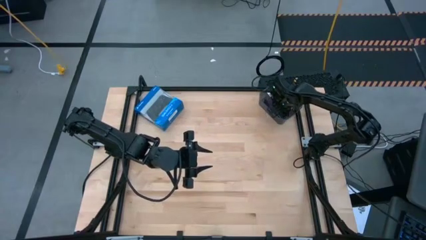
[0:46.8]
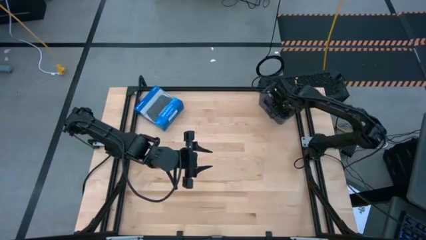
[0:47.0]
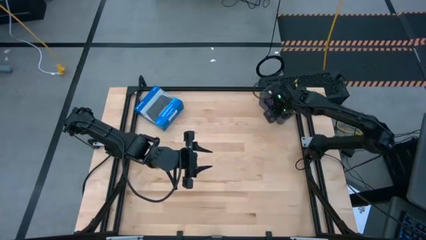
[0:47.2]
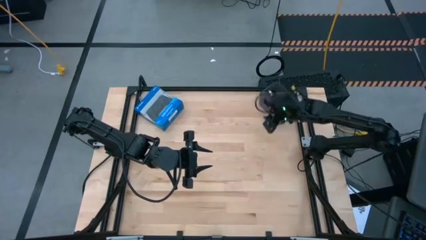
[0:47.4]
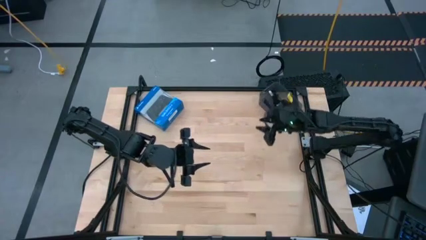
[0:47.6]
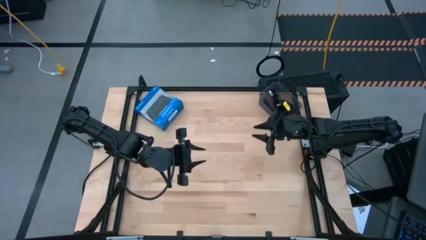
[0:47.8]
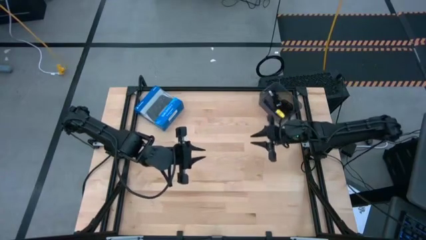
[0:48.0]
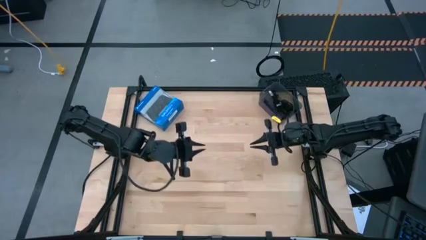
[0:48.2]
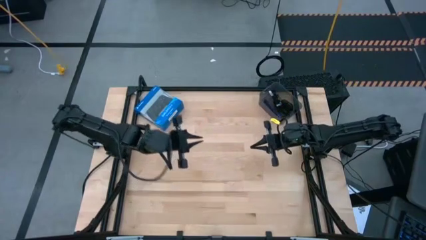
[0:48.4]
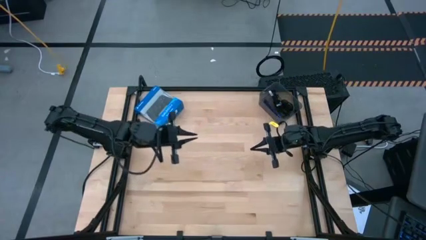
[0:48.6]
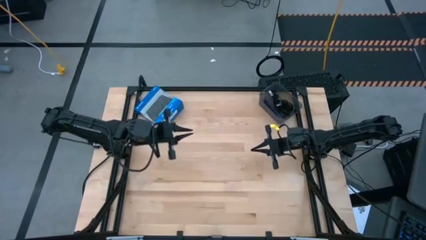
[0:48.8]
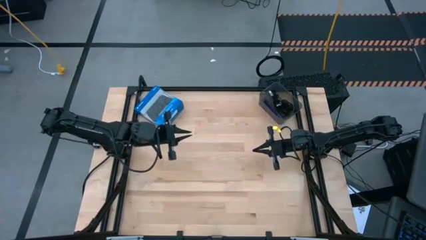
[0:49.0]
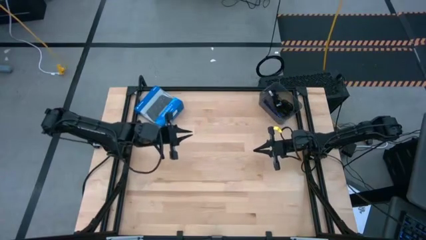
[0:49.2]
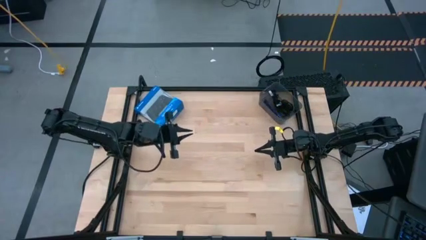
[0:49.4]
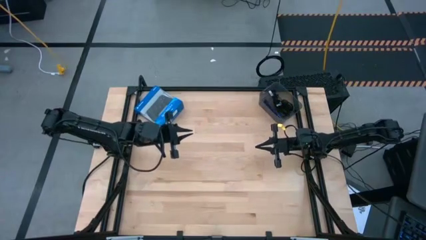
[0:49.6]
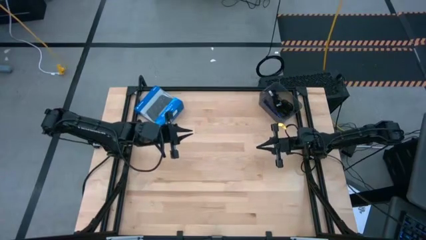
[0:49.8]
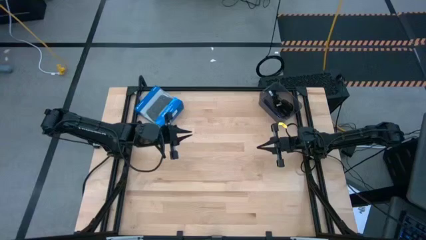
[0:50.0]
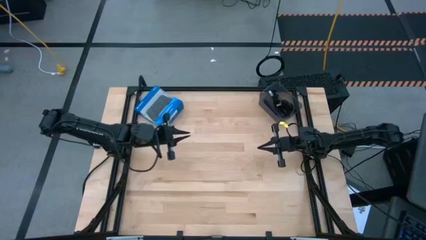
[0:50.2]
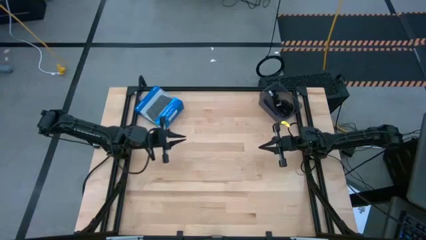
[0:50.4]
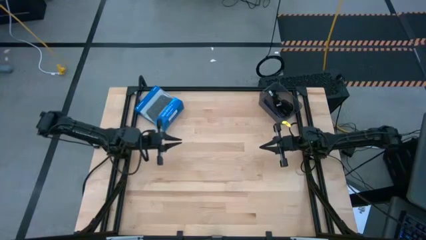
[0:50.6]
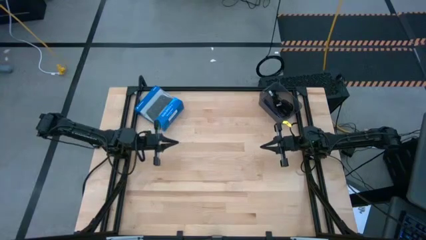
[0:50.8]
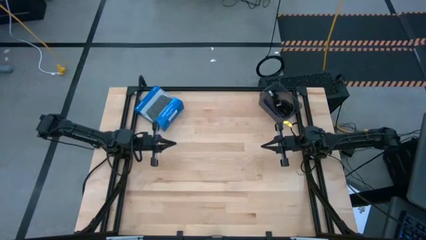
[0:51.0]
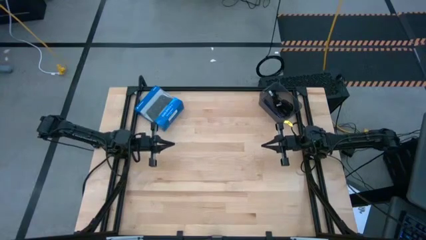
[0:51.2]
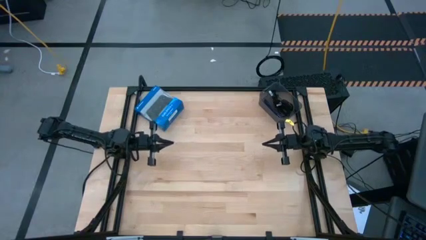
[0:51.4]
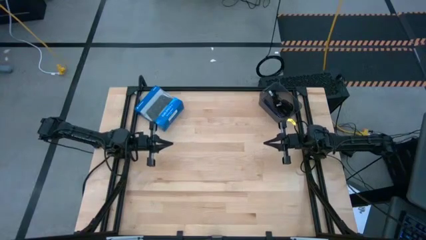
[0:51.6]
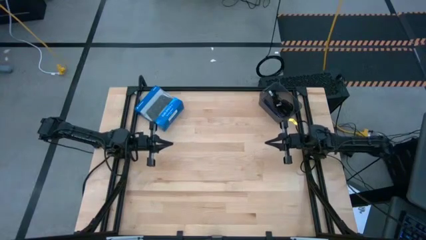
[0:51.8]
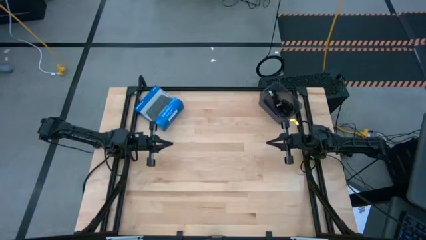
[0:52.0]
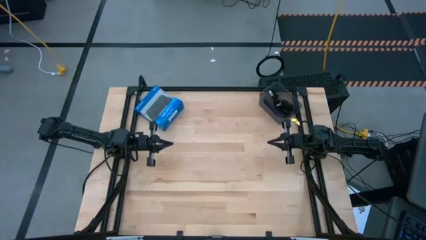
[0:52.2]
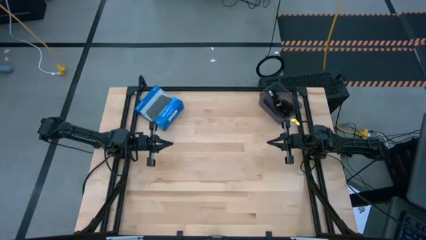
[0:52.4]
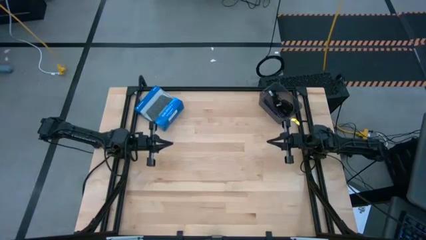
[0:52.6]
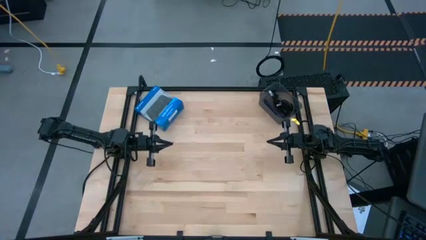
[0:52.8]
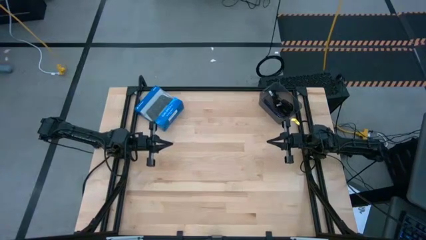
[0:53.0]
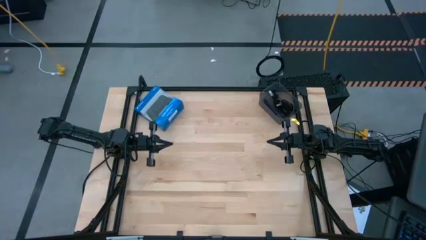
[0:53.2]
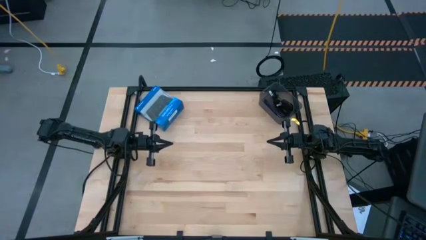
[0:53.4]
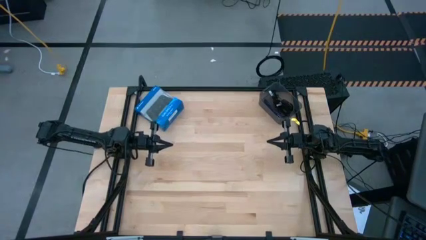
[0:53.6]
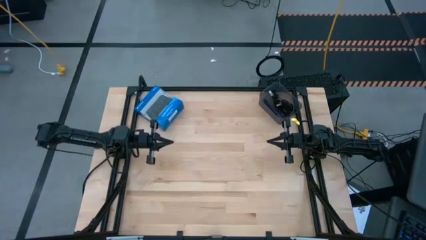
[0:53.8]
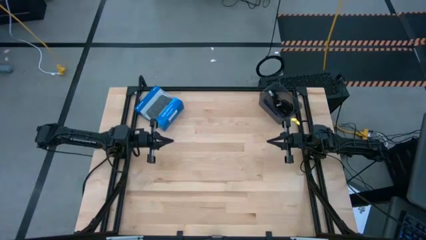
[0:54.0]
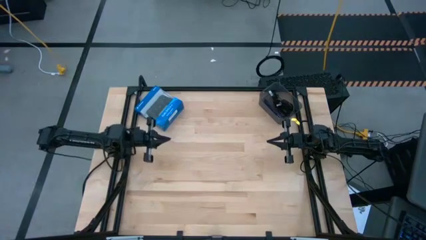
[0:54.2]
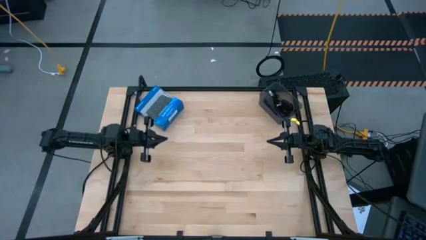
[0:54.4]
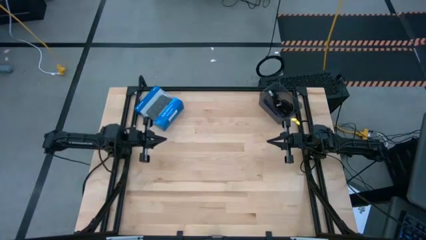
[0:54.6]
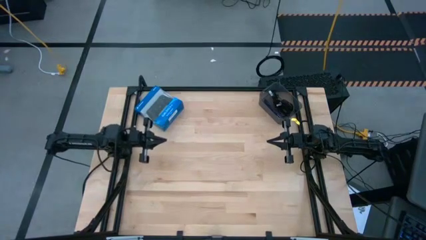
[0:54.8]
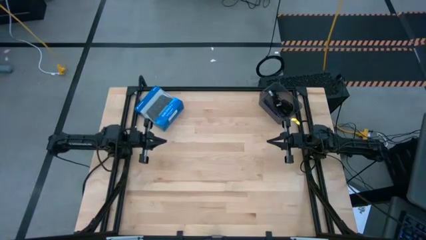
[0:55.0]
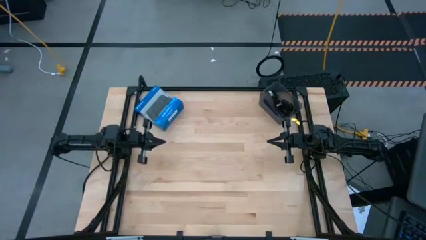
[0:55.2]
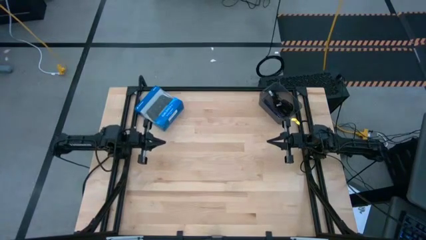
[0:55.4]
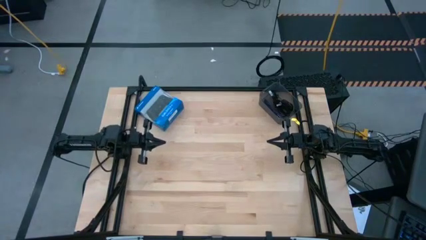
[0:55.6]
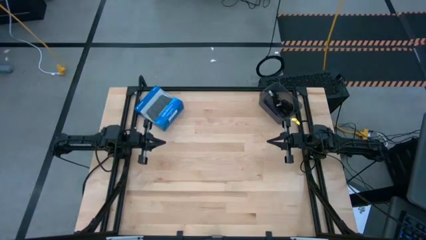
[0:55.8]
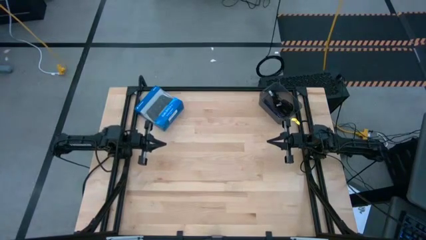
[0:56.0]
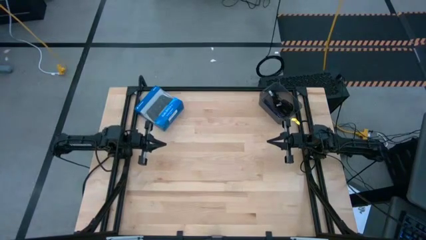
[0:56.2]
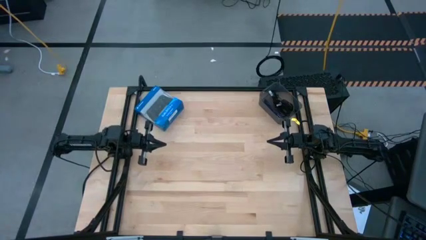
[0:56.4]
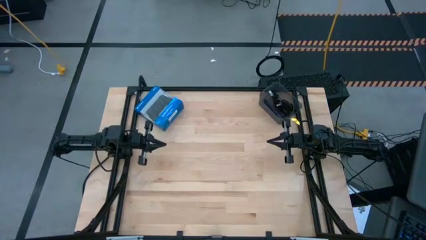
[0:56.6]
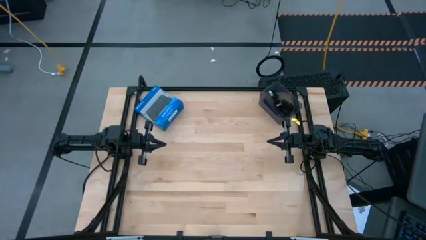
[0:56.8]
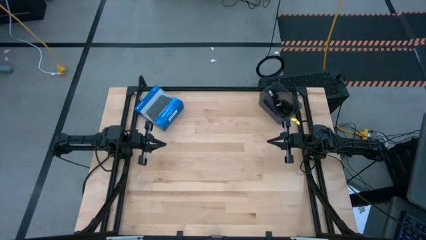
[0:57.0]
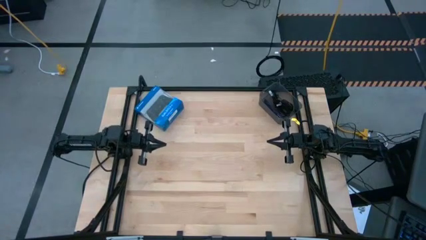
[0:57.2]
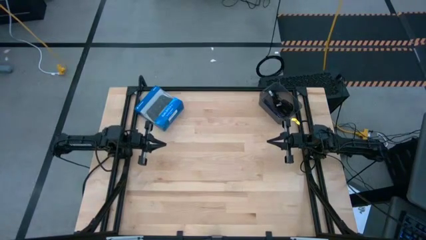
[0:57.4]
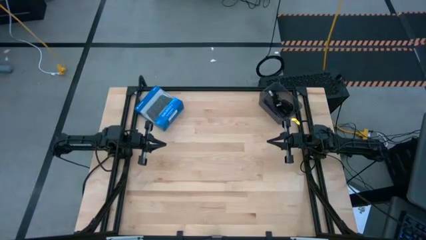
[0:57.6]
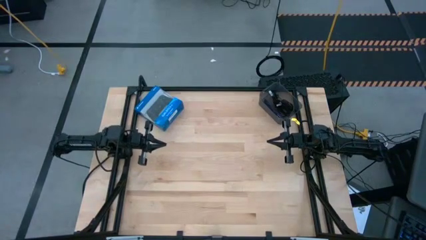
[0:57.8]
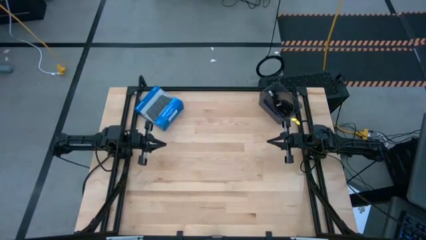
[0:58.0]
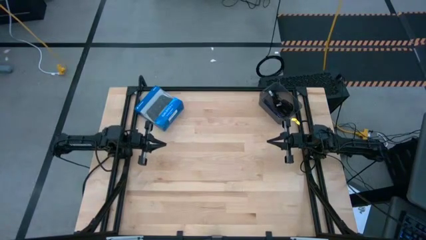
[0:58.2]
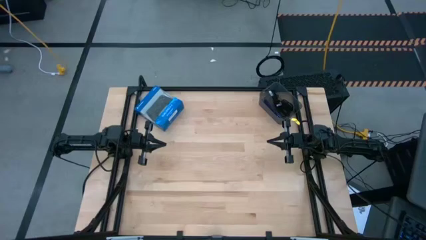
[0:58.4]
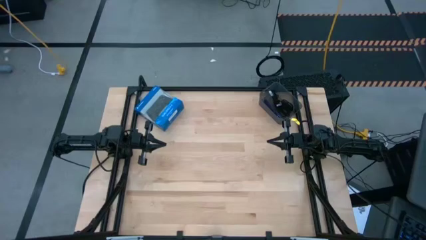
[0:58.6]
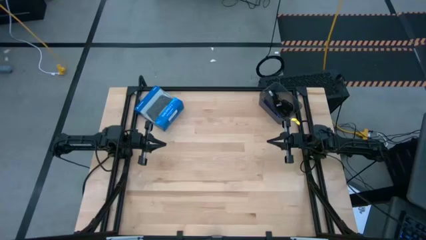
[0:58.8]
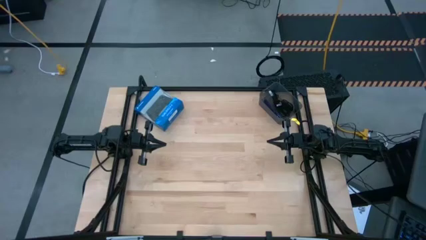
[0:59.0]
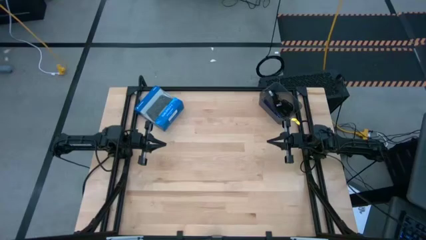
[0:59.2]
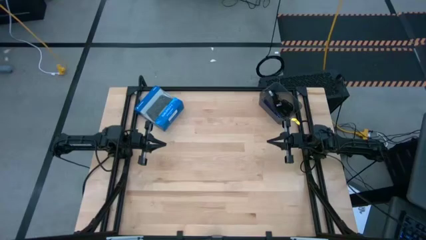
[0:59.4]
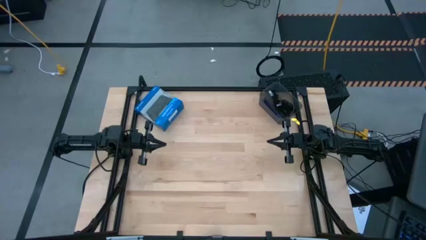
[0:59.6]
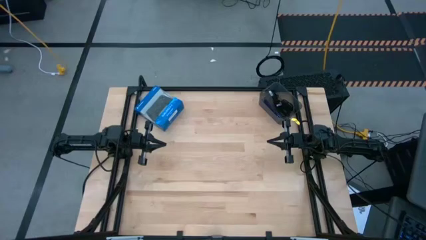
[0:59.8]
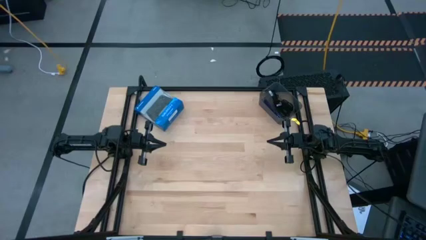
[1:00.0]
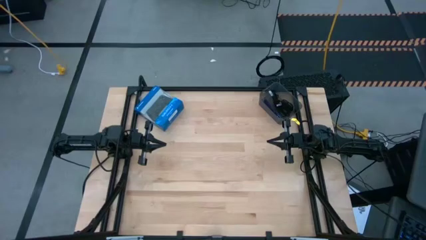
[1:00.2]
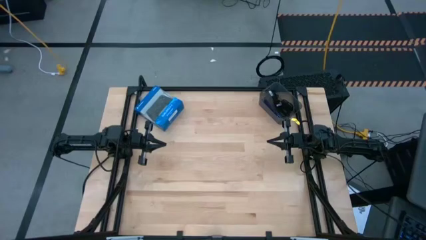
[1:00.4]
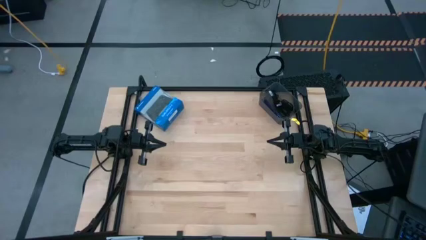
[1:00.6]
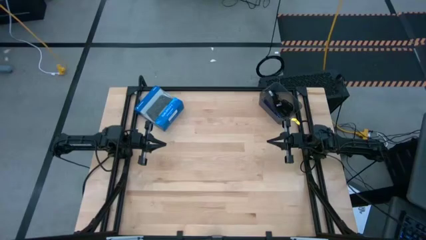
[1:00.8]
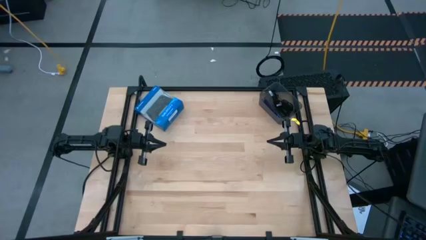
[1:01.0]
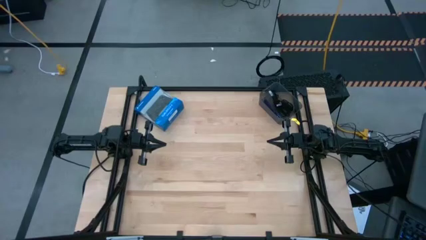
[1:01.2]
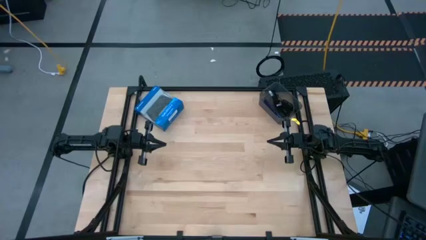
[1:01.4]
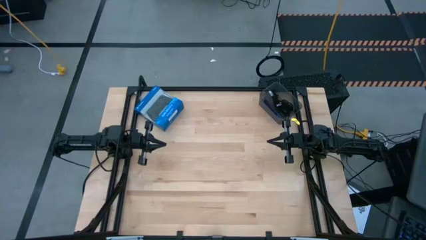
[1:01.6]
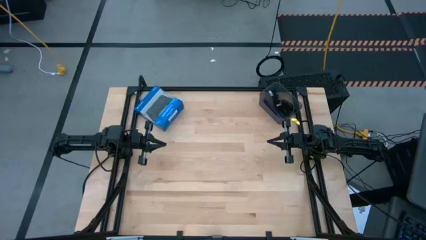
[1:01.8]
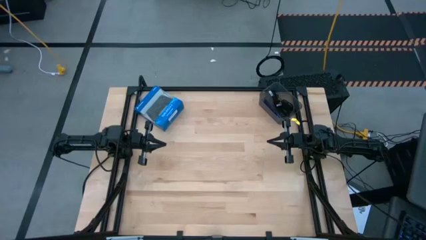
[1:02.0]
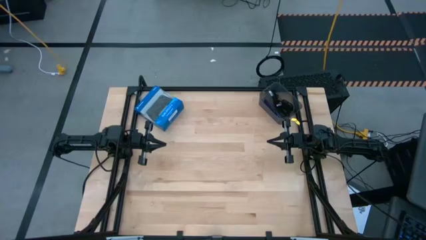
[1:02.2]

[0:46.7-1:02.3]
Task: Pick and place USB-C Cables
Return to Home Position
